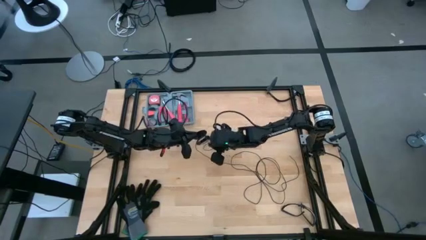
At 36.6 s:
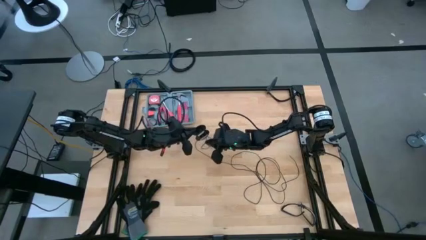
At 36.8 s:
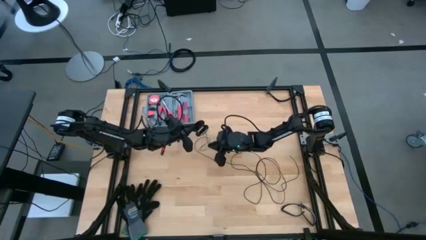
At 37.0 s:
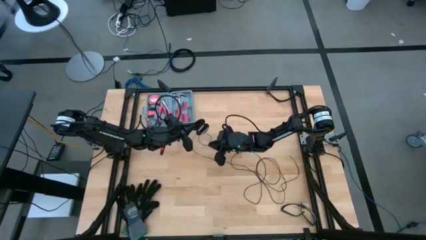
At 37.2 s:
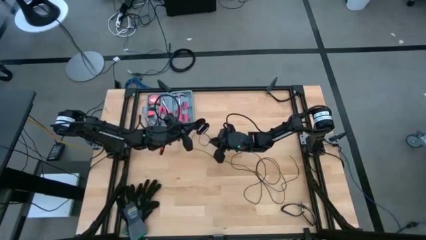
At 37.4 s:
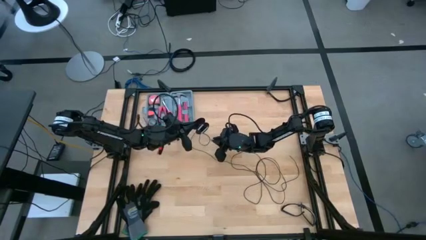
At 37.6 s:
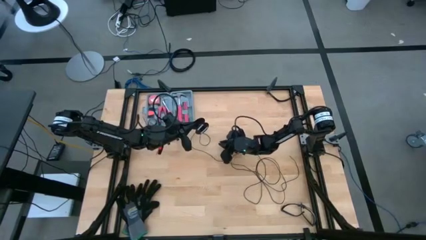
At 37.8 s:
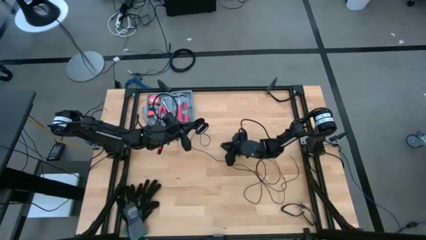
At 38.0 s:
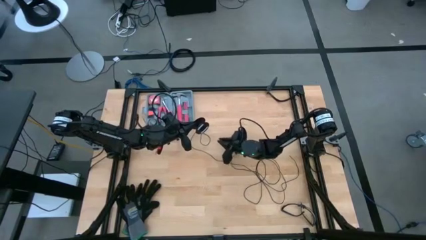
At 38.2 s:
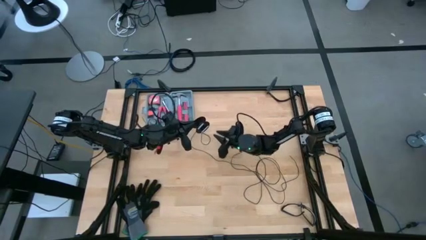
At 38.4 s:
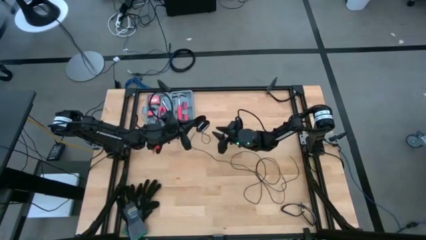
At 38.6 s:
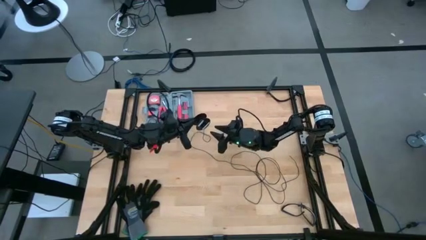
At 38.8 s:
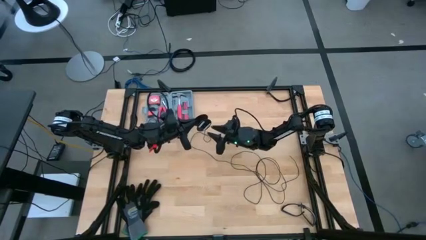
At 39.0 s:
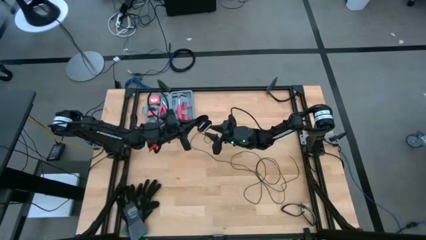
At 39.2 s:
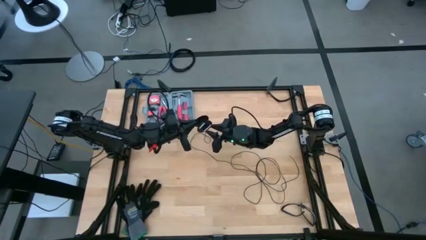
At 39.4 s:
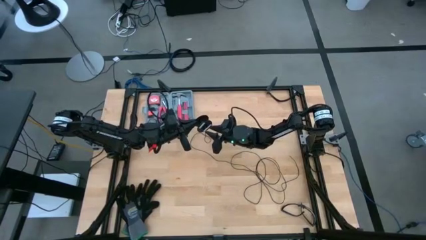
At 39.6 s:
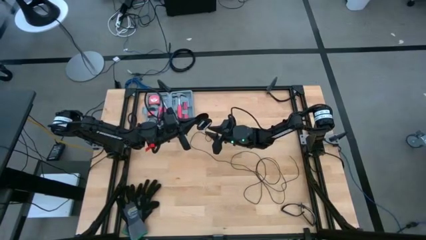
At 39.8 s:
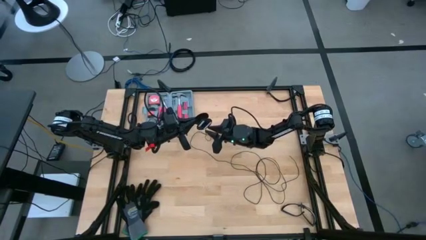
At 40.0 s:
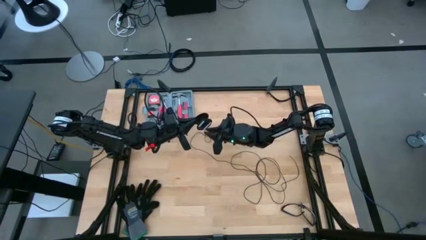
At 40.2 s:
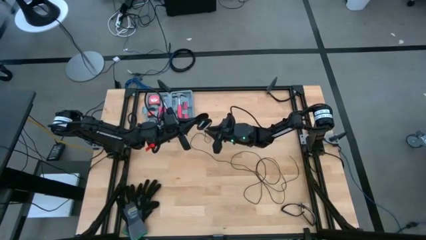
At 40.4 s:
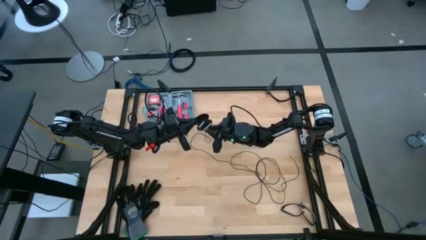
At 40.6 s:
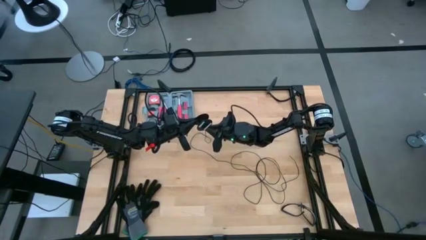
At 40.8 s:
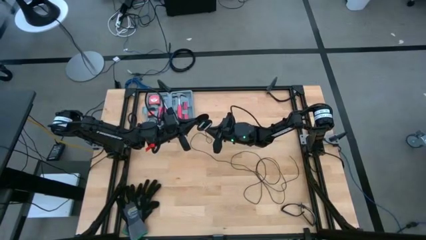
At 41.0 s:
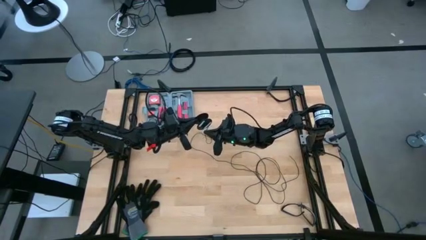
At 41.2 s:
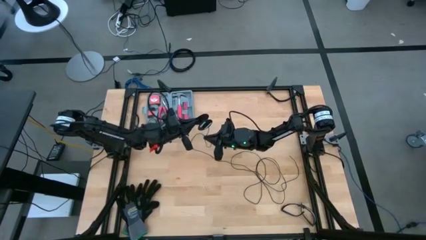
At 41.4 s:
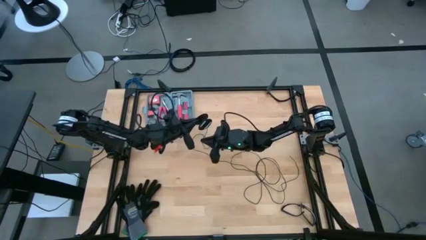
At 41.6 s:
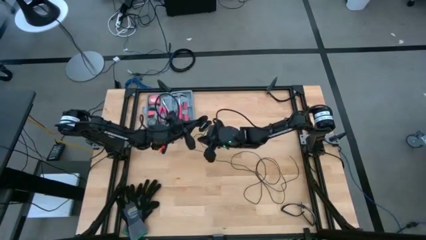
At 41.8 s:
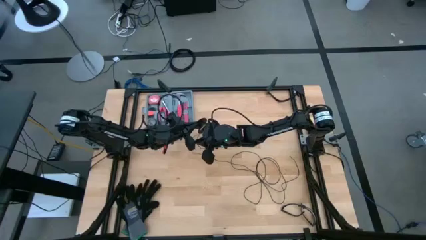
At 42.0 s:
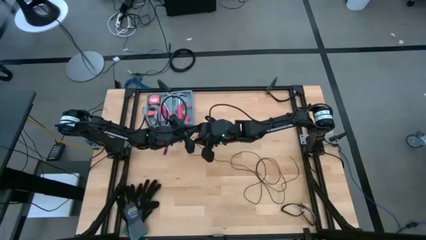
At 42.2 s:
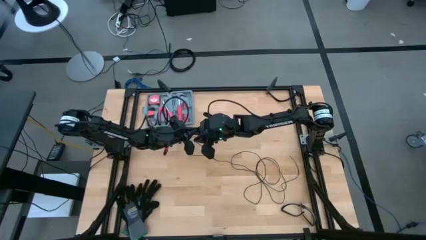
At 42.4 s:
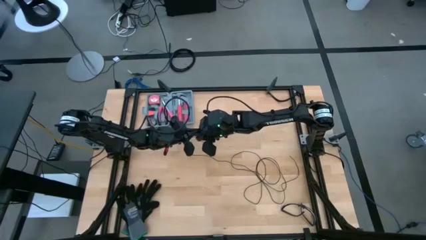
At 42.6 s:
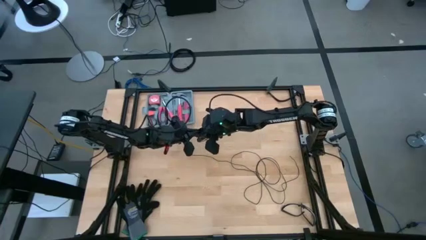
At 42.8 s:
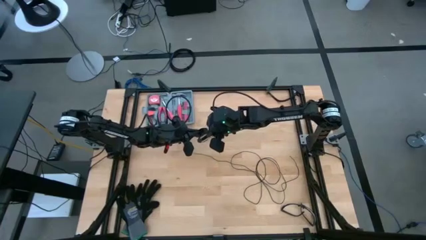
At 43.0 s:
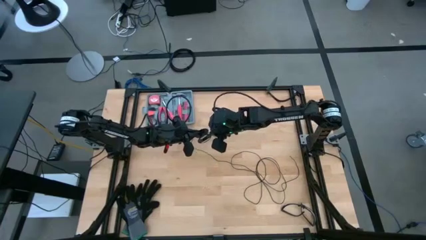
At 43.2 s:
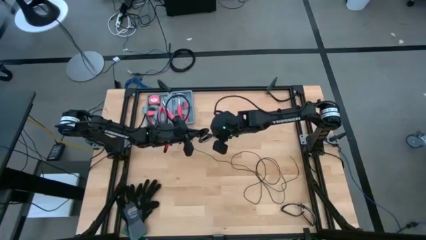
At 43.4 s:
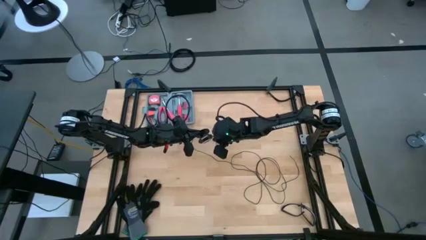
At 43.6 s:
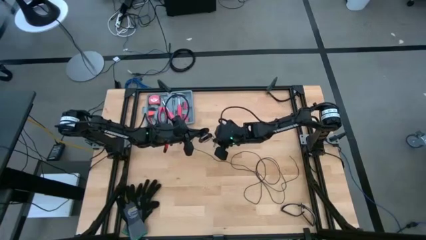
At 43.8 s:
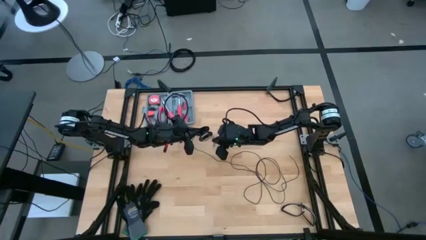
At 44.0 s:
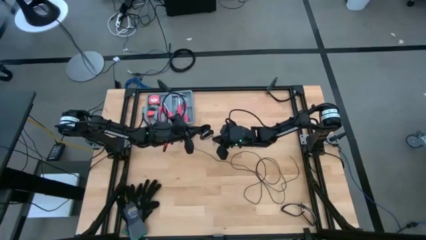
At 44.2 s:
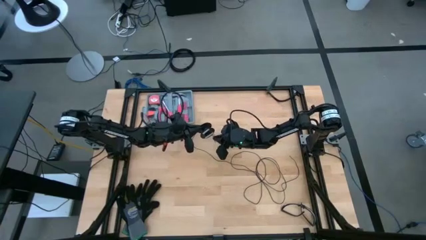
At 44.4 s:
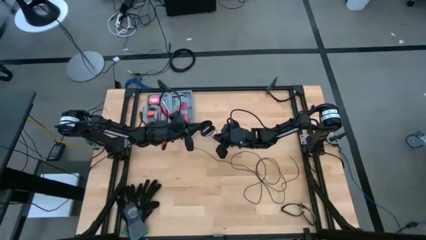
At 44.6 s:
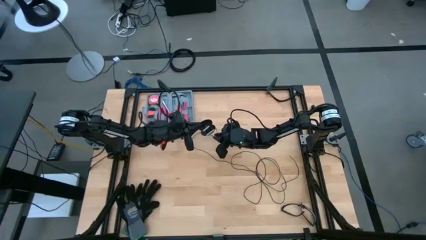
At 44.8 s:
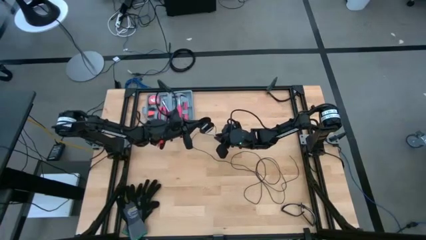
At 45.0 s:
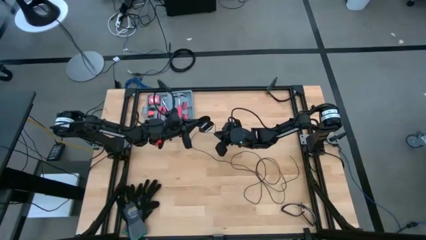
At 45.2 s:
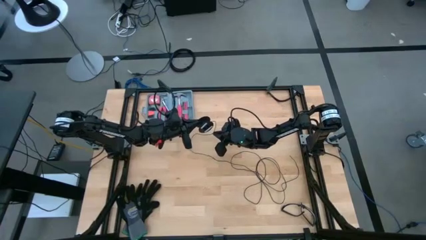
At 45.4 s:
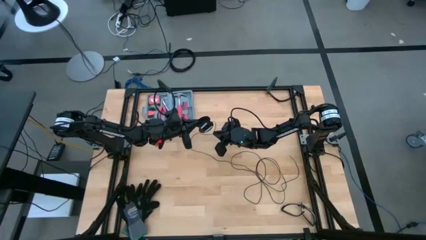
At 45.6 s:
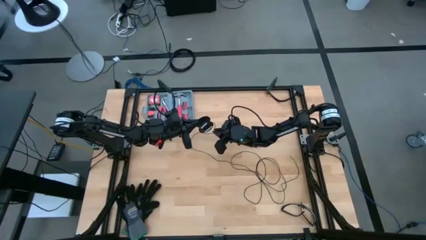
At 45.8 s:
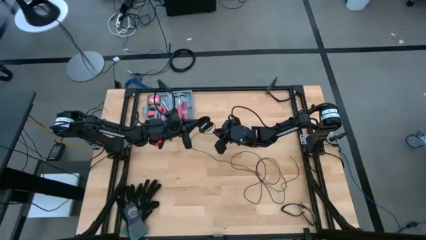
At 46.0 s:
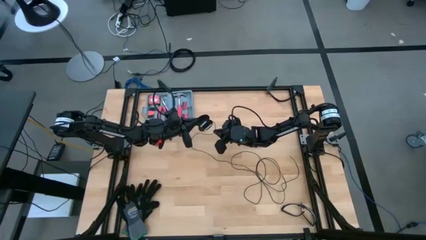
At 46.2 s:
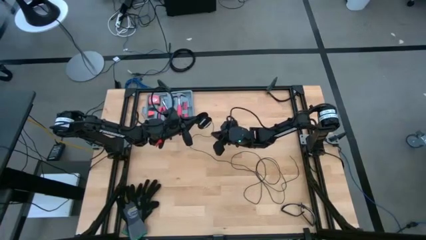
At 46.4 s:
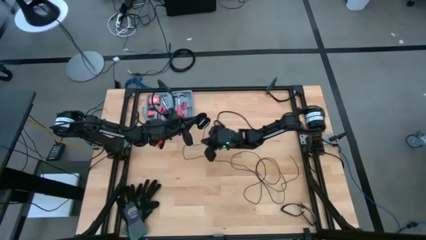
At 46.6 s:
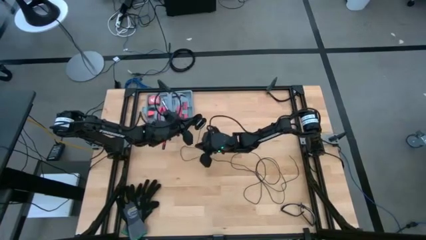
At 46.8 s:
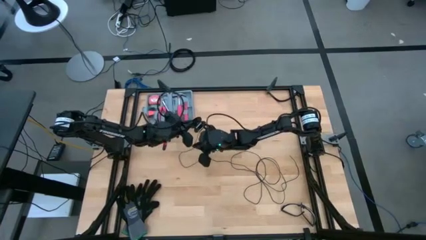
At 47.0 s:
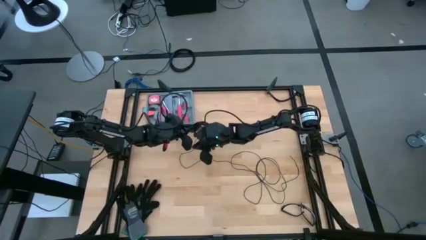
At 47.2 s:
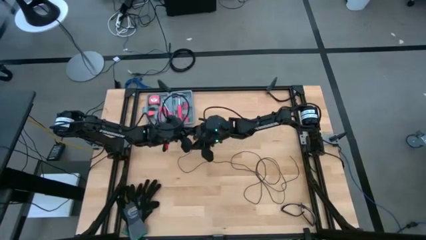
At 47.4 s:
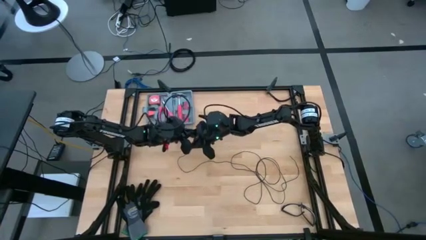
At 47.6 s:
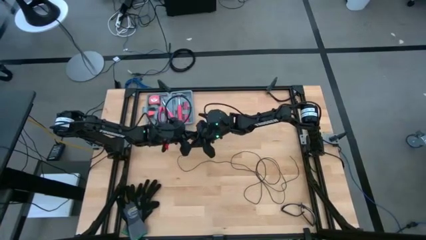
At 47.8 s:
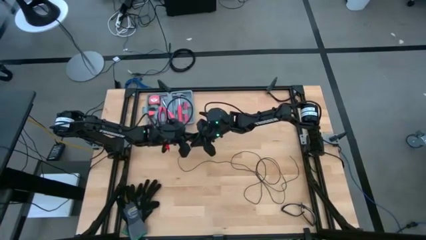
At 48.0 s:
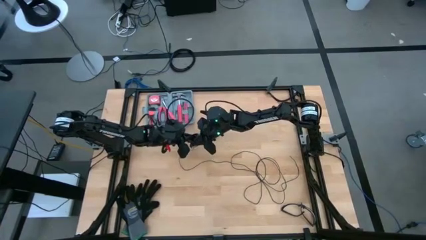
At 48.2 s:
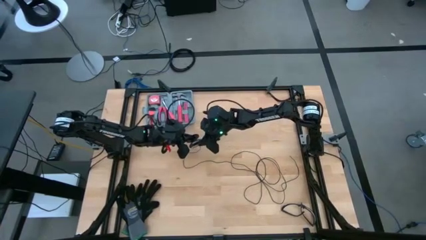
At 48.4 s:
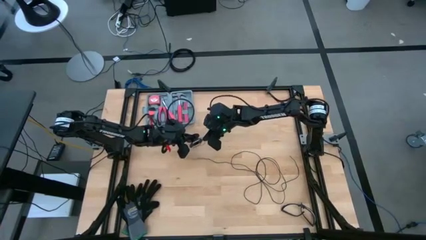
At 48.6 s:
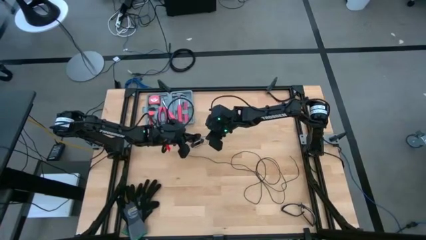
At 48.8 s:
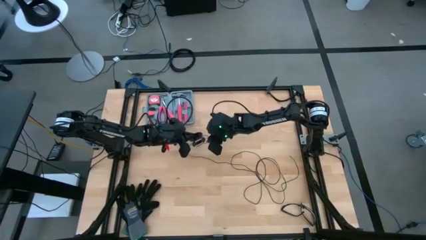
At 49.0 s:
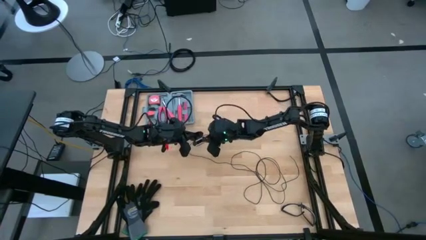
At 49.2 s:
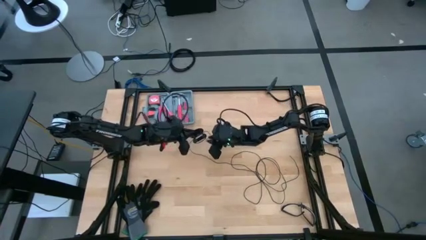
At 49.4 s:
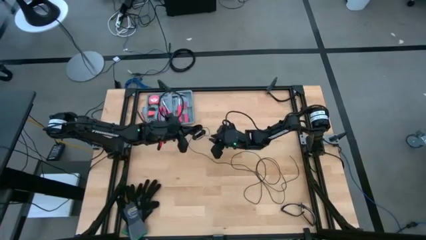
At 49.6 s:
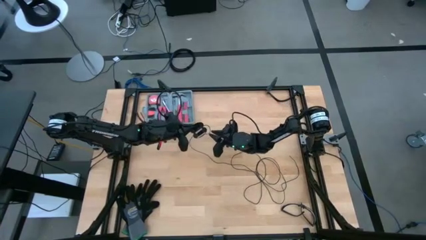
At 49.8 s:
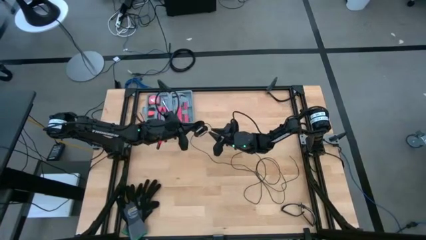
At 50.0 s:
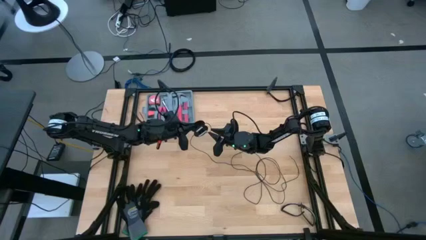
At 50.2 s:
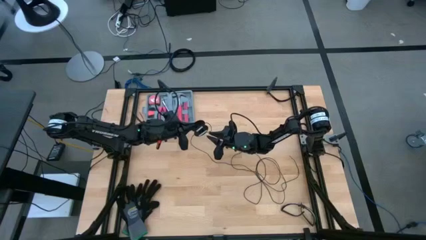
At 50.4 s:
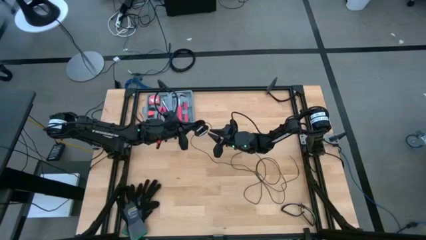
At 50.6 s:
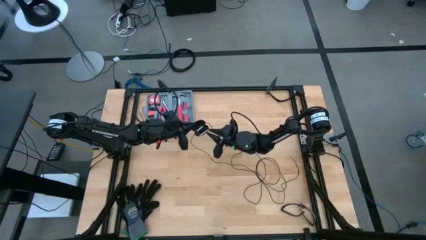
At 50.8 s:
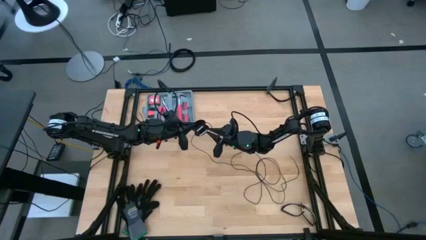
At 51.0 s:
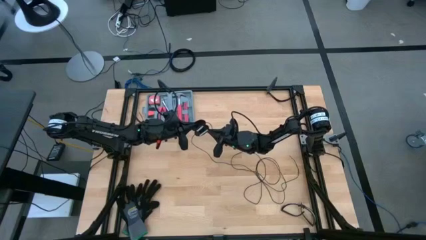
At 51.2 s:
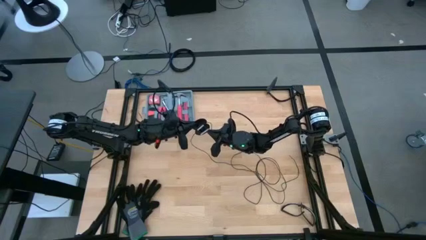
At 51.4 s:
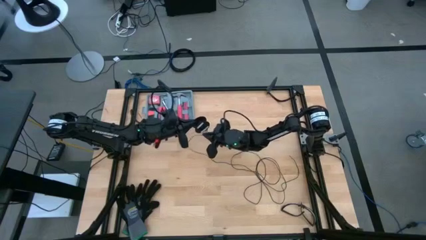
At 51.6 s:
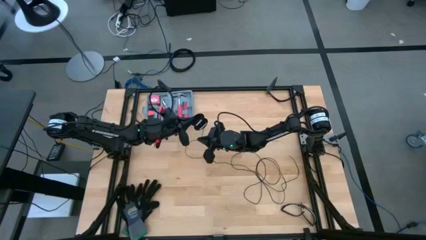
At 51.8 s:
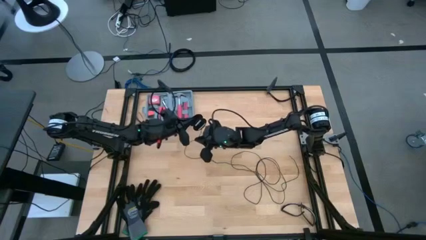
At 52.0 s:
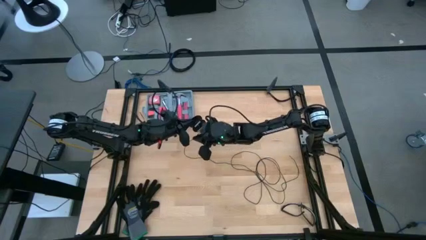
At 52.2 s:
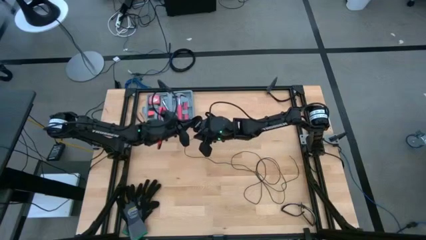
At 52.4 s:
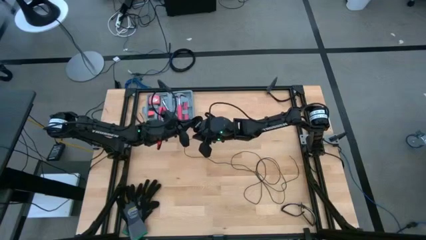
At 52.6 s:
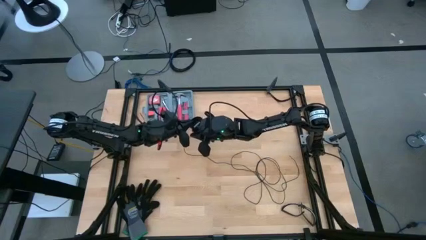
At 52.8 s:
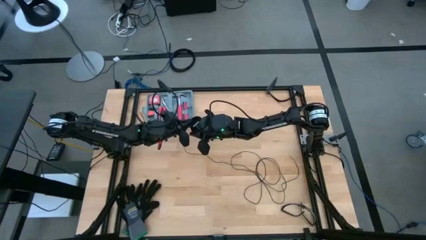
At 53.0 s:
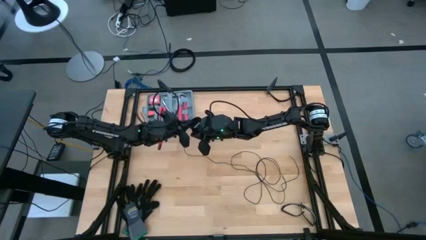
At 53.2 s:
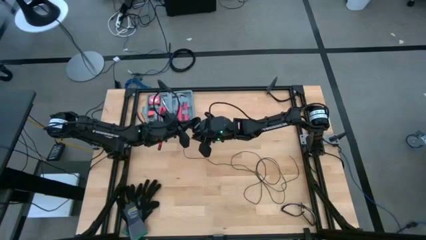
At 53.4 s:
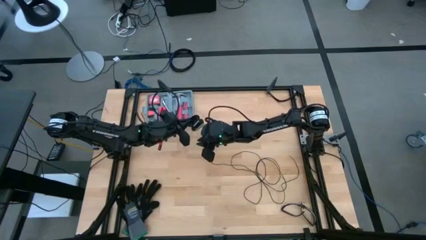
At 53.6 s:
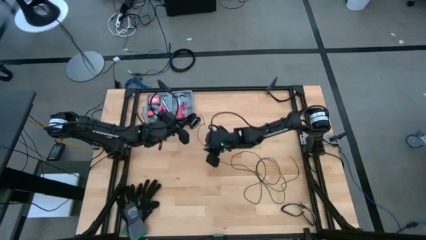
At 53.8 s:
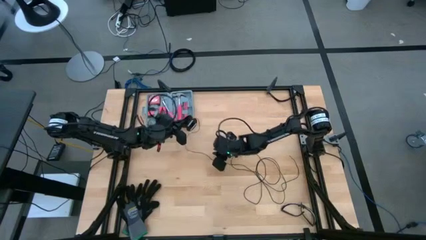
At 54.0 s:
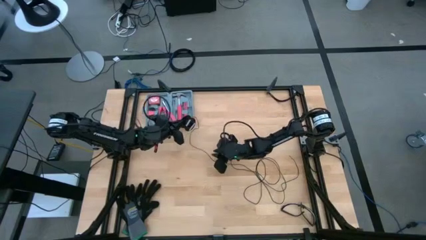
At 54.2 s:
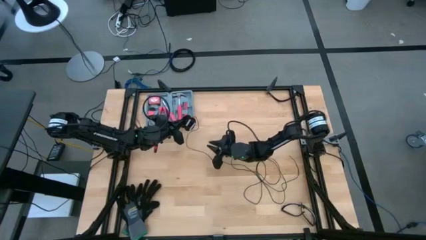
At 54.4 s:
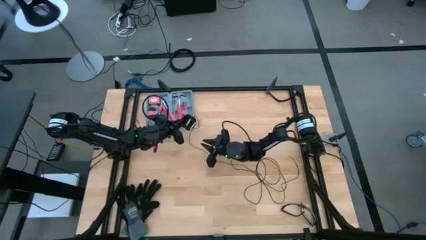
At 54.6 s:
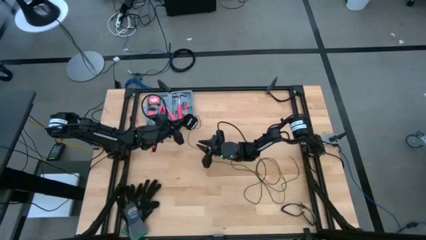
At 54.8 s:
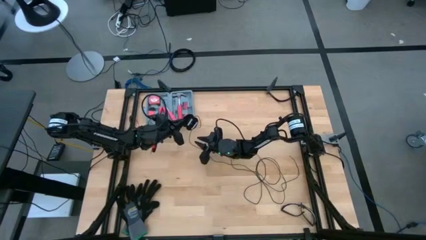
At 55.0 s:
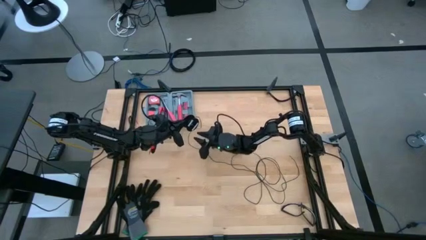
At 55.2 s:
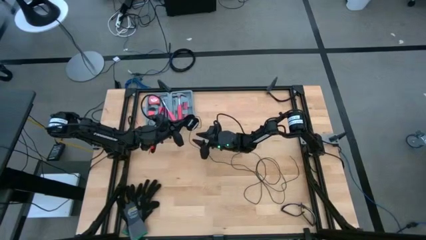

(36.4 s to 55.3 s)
Task: Coil cords
Coil the black wire onto the spool
